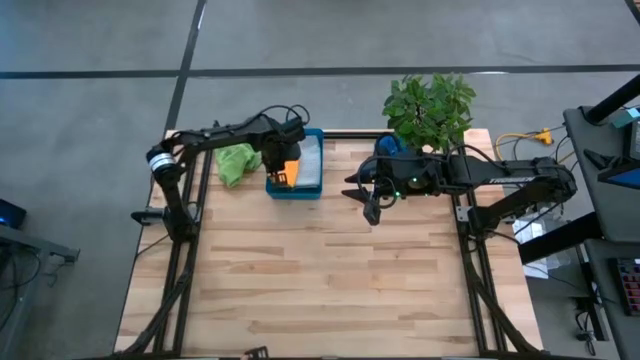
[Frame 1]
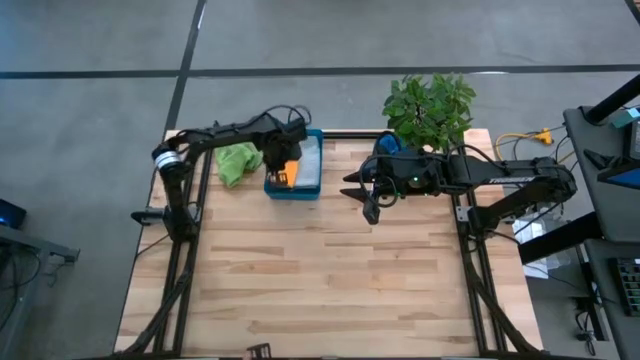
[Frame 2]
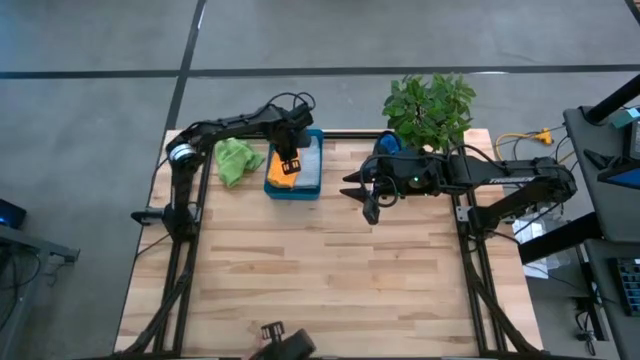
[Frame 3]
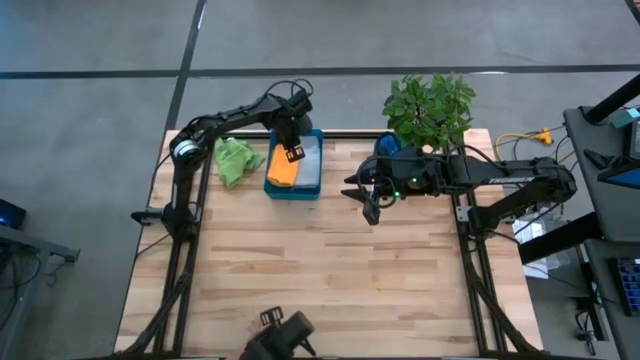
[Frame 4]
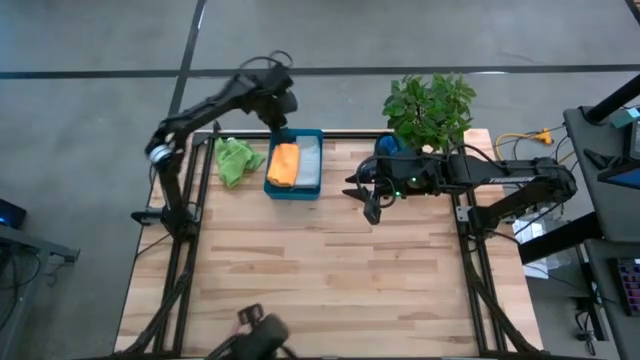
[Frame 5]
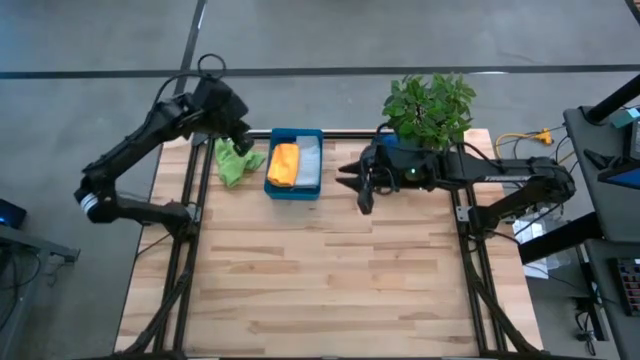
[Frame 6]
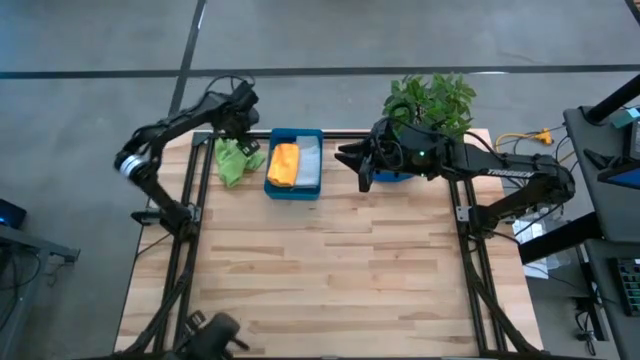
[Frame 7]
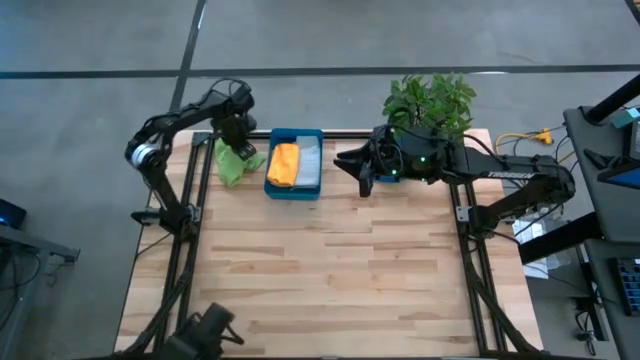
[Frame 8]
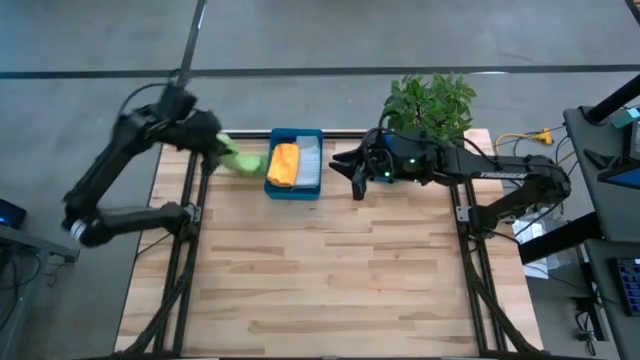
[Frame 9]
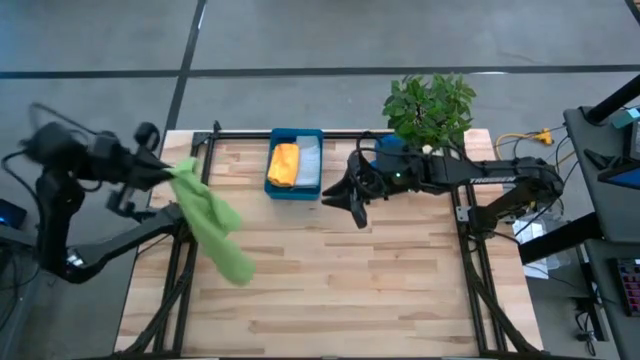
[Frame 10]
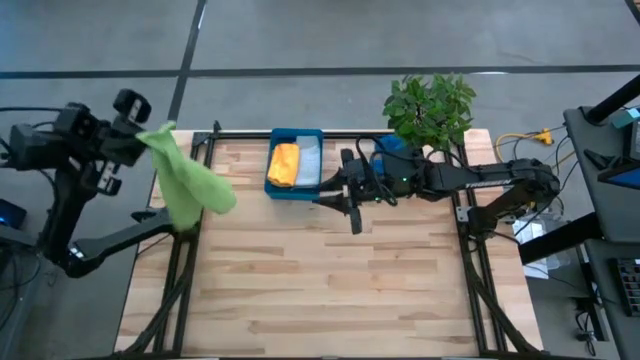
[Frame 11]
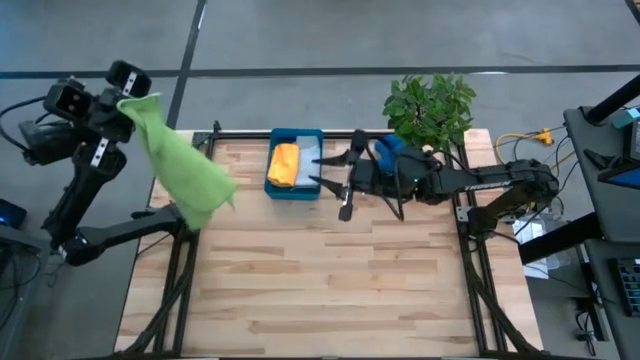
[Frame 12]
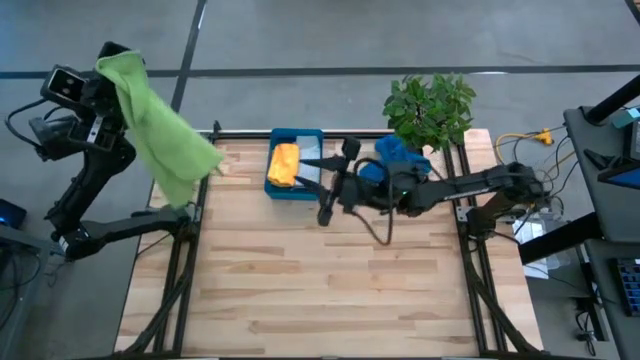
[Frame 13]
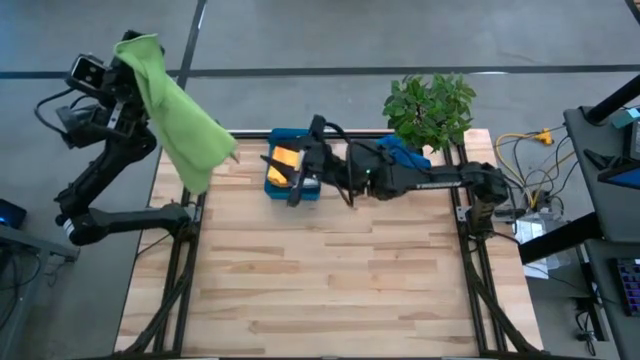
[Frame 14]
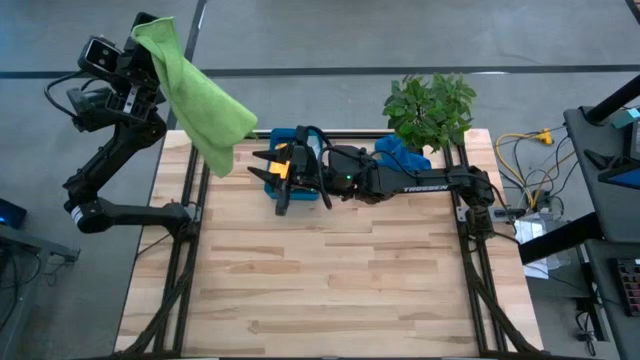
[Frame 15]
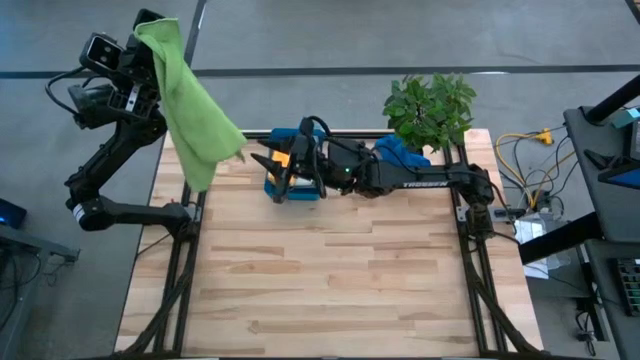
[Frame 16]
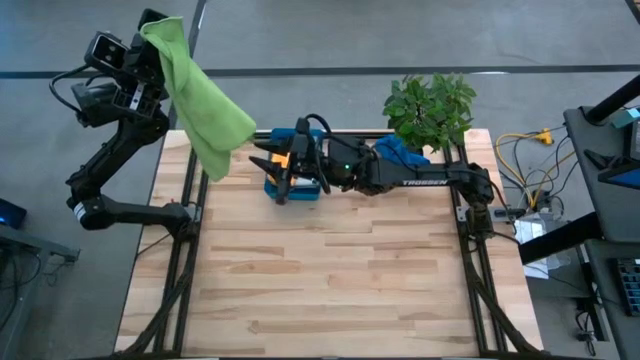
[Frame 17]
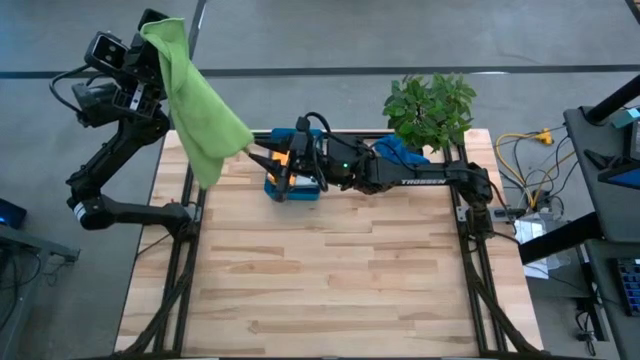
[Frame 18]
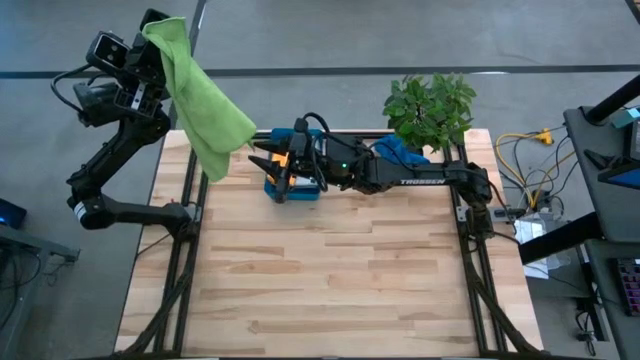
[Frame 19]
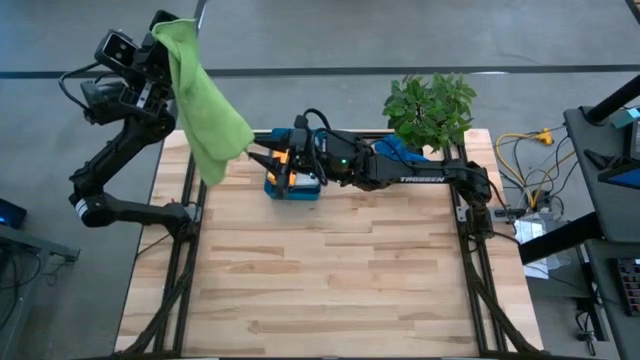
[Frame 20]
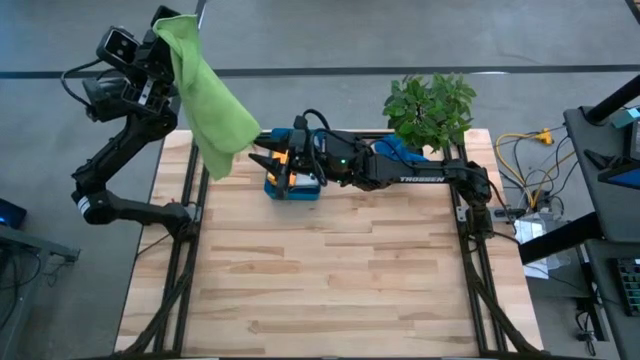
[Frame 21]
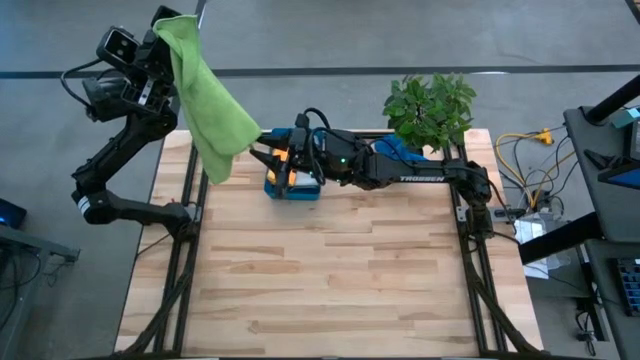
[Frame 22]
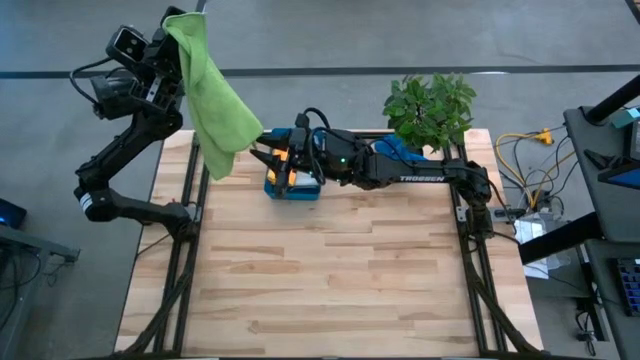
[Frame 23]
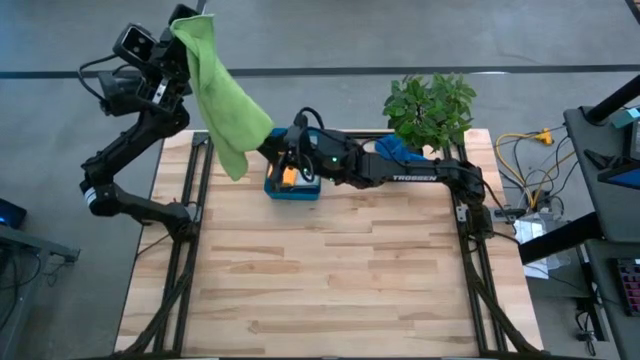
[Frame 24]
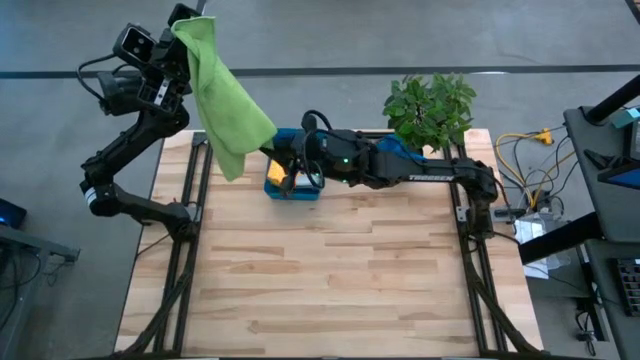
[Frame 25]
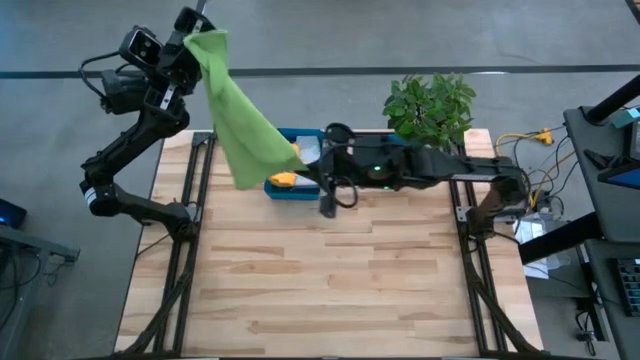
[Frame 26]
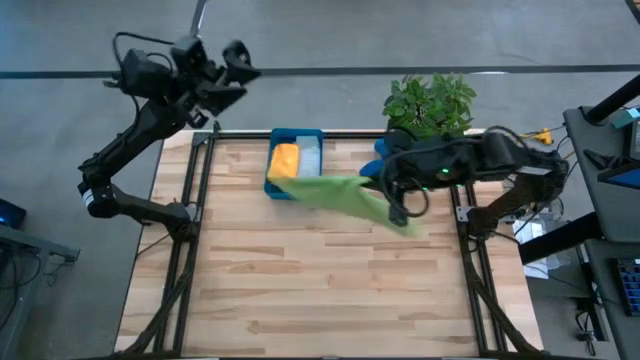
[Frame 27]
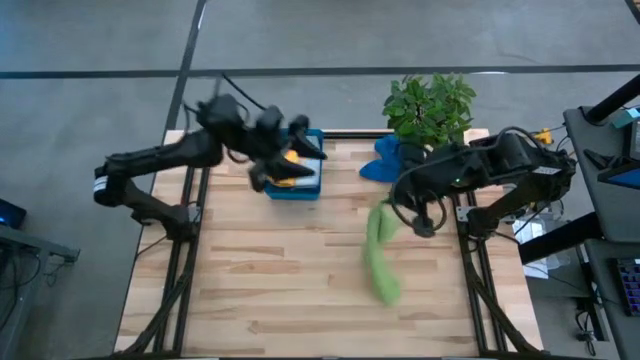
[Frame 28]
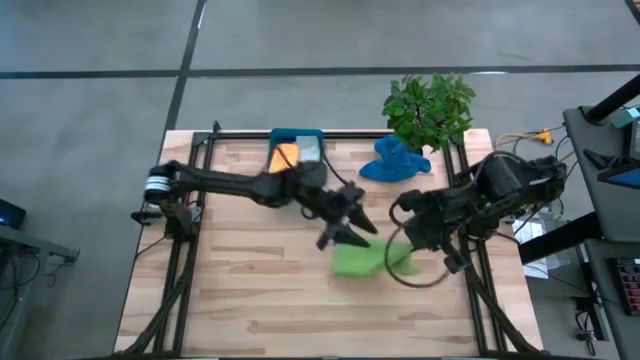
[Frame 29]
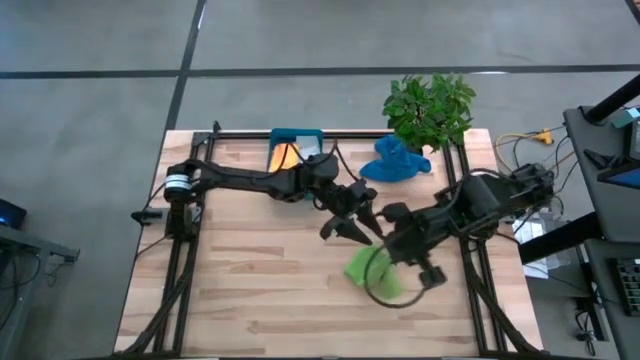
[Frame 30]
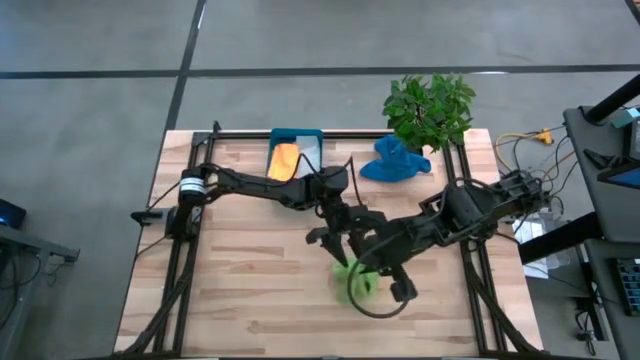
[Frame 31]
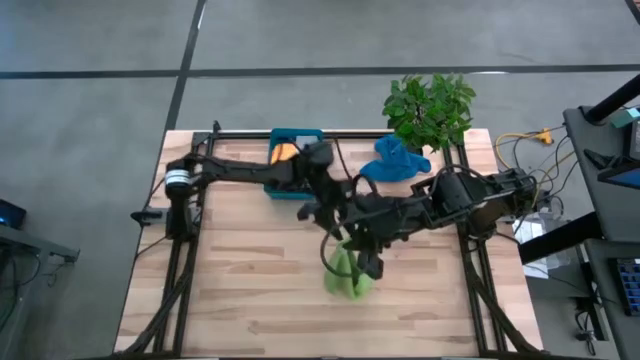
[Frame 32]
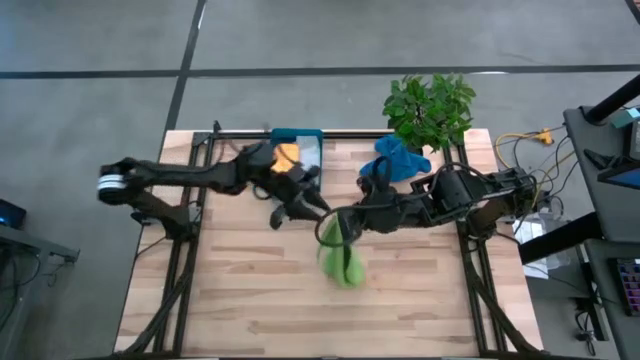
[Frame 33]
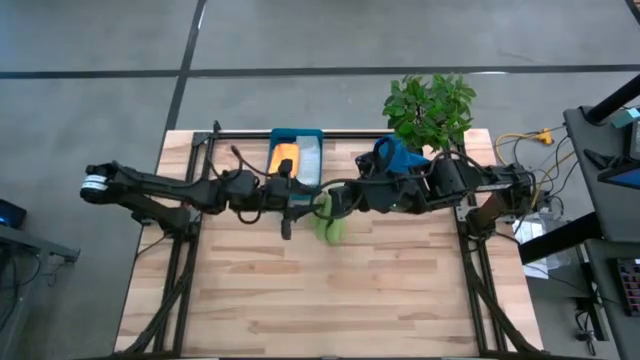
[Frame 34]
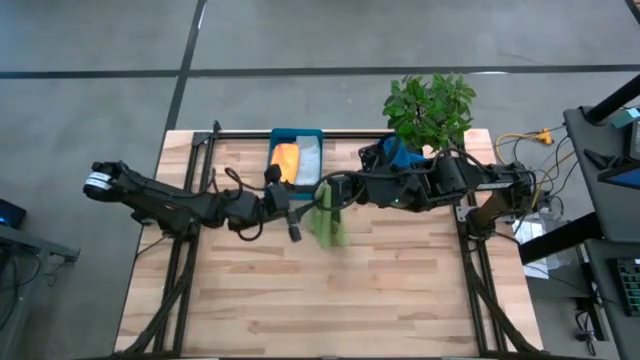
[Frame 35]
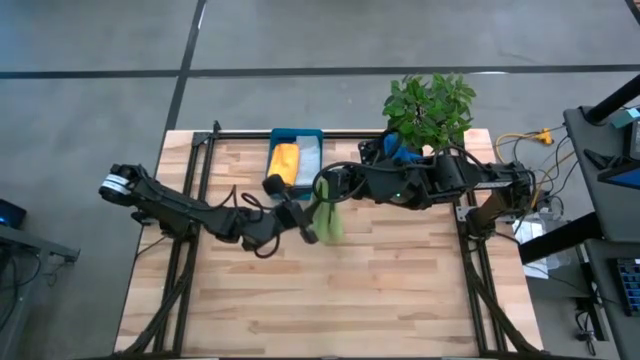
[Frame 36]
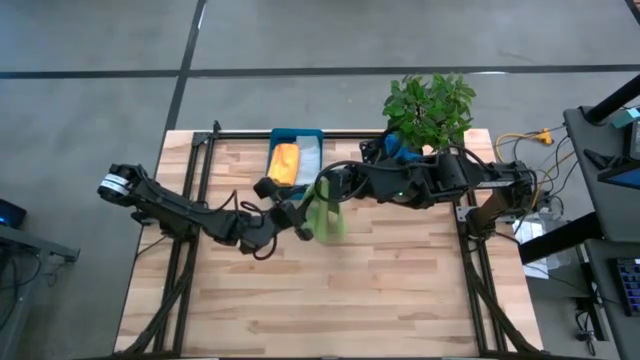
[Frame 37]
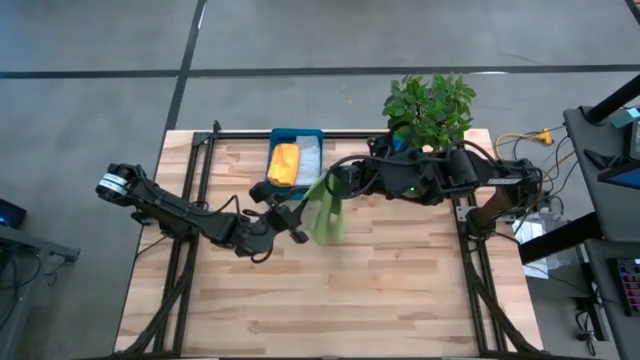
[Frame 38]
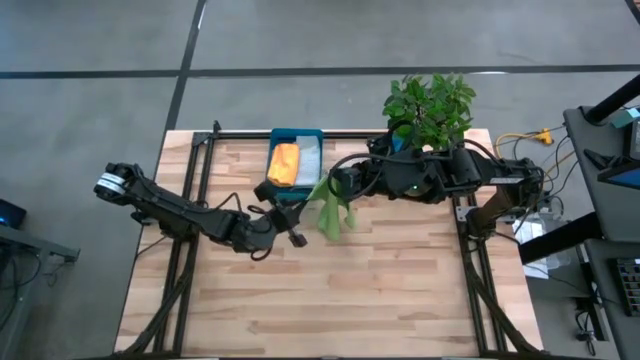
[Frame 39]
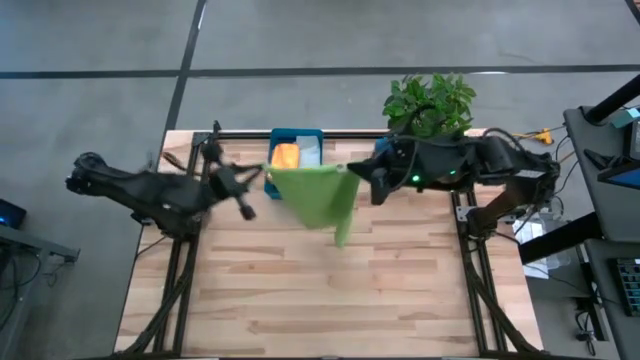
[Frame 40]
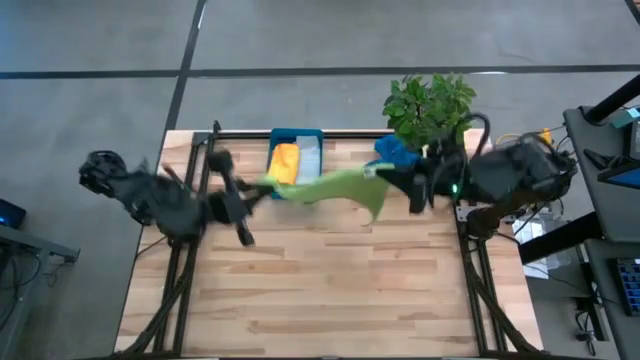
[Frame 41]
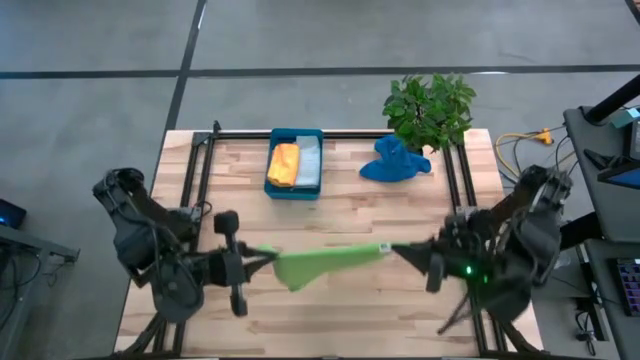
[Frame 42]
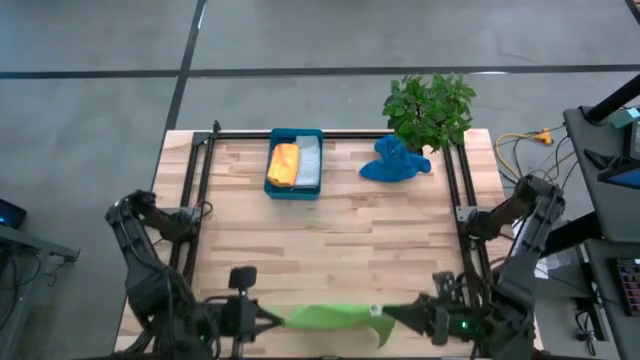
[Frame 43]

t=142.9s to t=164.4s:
Task: Fold microfiber towels
Fold the green microfiber cloth
